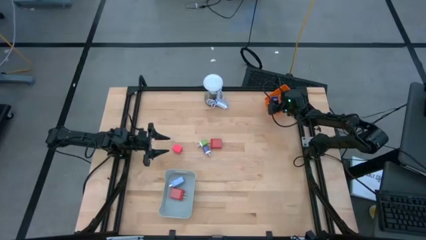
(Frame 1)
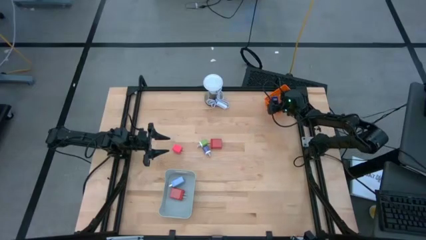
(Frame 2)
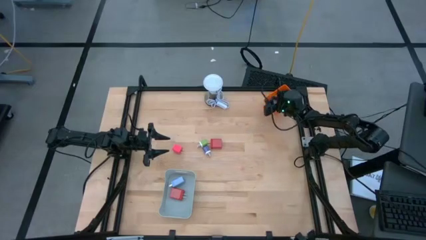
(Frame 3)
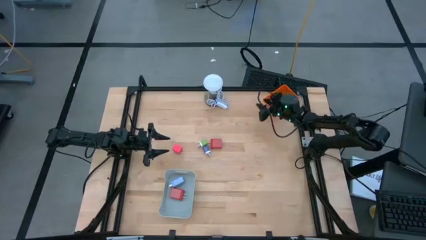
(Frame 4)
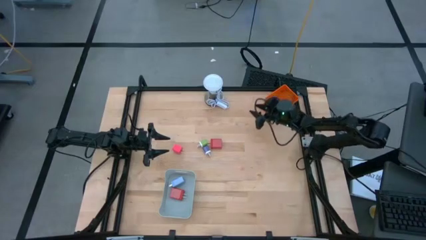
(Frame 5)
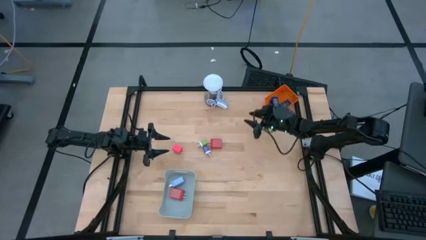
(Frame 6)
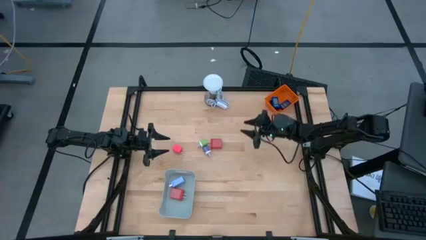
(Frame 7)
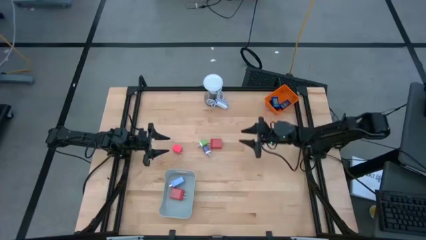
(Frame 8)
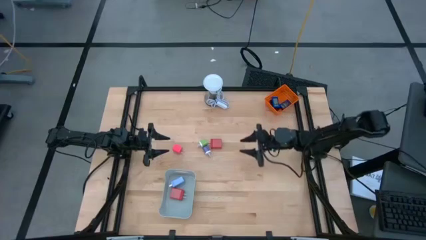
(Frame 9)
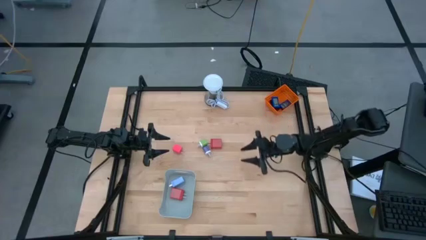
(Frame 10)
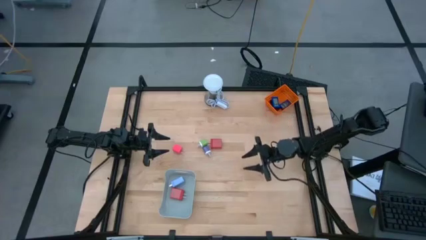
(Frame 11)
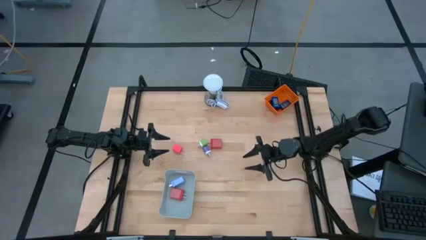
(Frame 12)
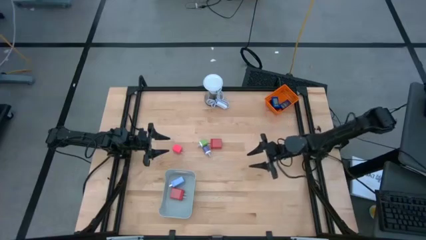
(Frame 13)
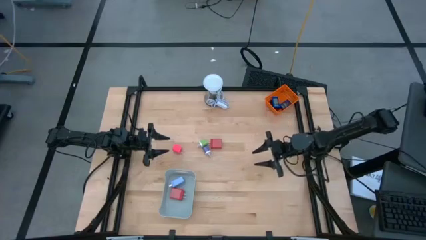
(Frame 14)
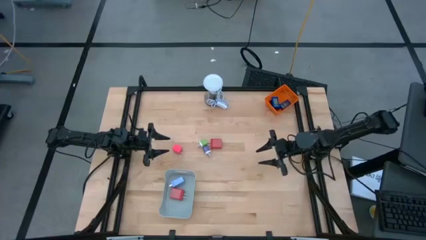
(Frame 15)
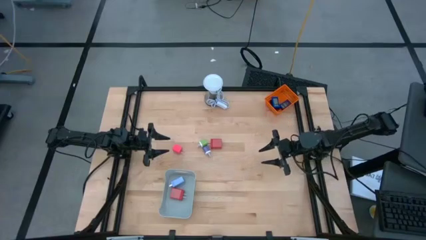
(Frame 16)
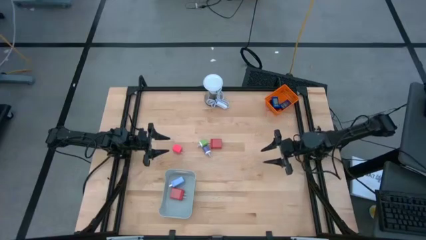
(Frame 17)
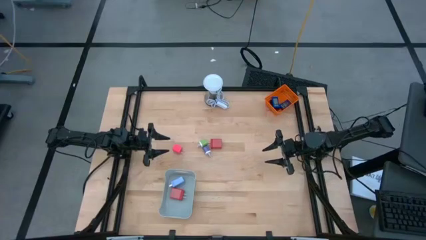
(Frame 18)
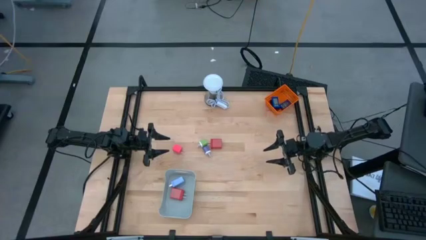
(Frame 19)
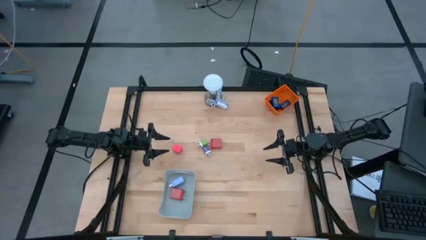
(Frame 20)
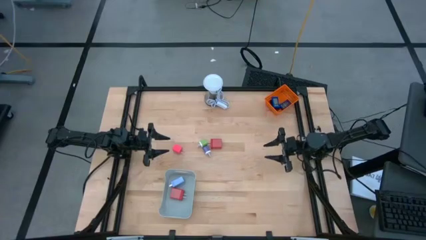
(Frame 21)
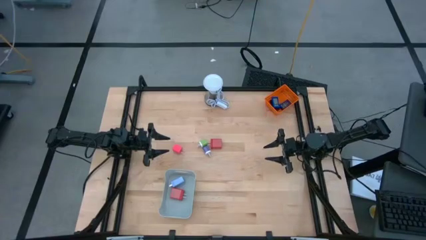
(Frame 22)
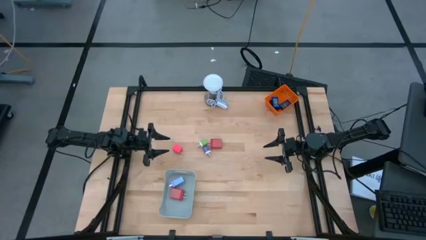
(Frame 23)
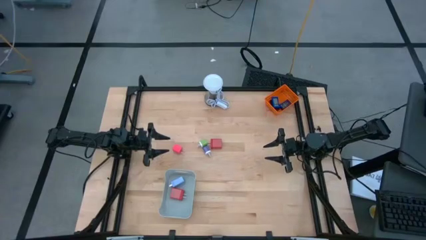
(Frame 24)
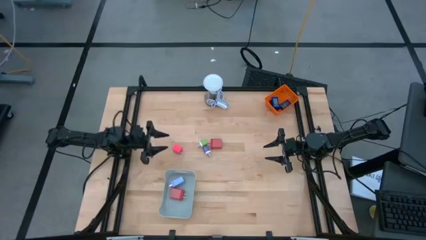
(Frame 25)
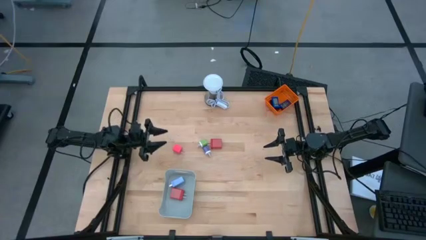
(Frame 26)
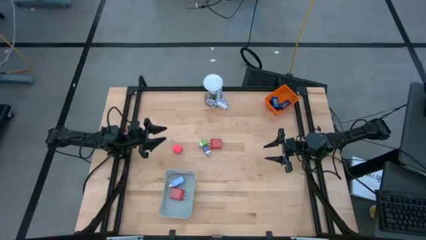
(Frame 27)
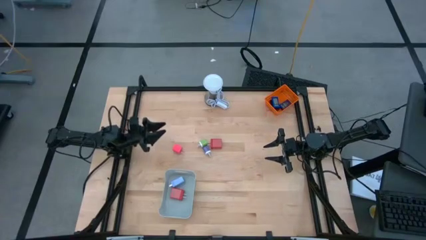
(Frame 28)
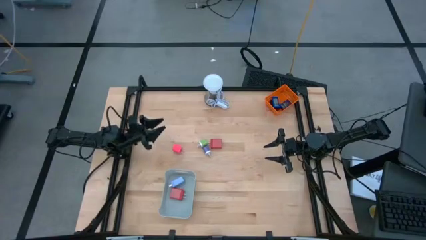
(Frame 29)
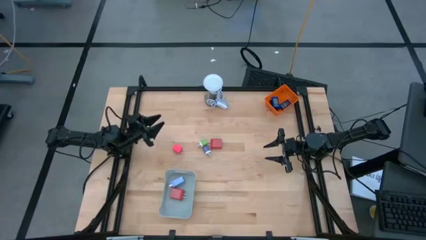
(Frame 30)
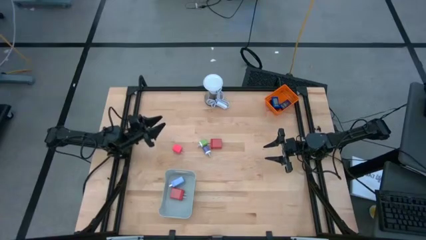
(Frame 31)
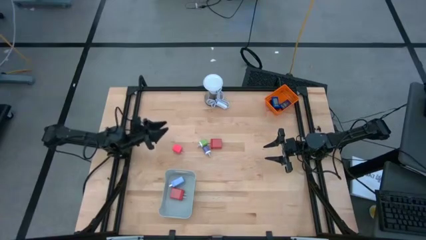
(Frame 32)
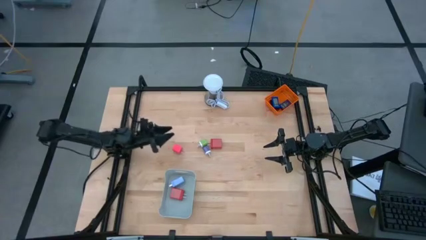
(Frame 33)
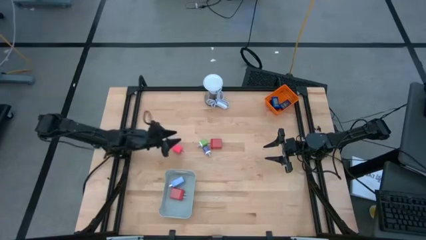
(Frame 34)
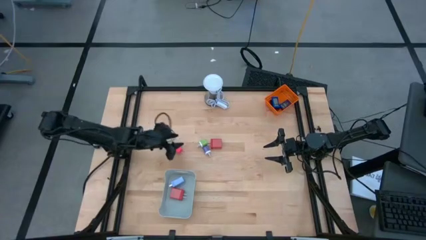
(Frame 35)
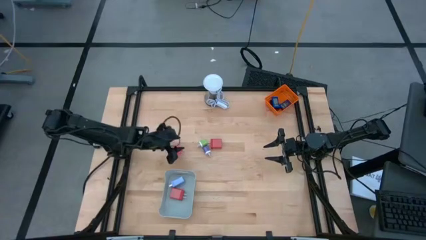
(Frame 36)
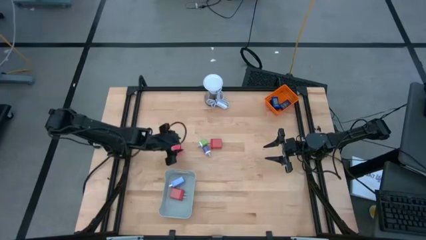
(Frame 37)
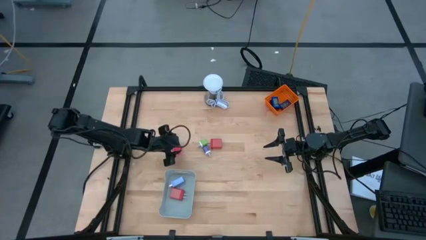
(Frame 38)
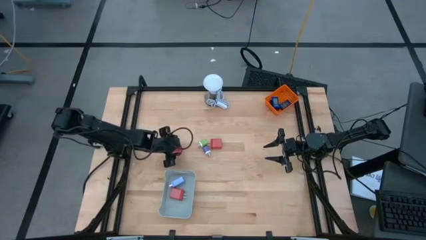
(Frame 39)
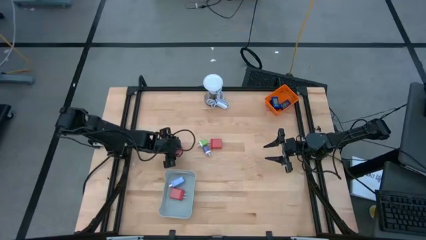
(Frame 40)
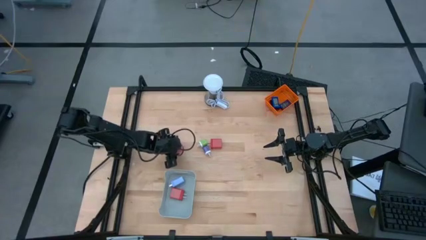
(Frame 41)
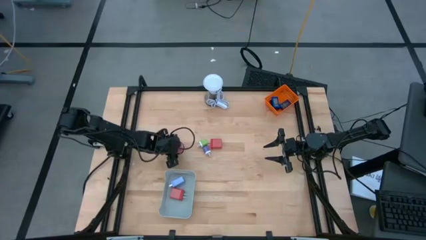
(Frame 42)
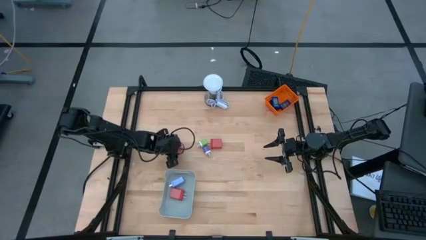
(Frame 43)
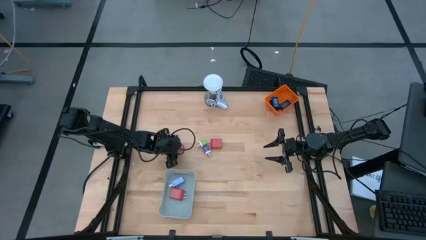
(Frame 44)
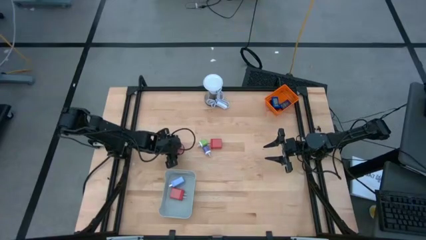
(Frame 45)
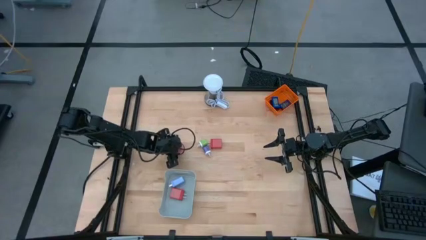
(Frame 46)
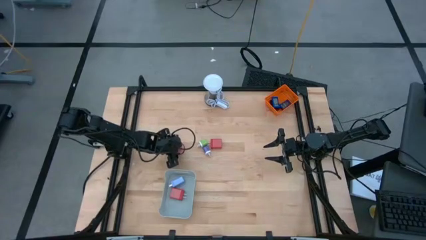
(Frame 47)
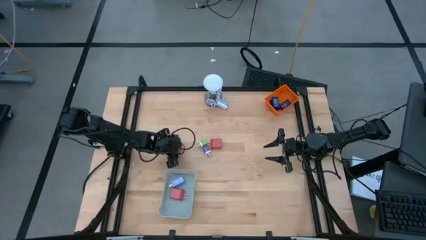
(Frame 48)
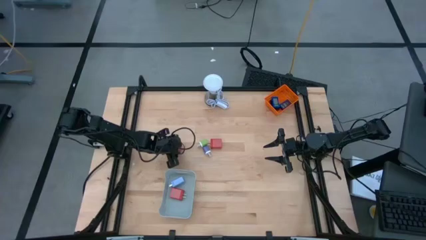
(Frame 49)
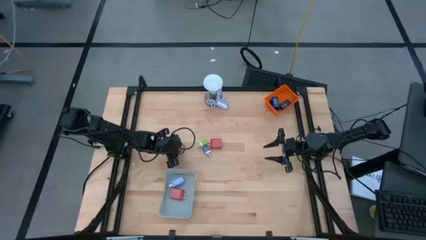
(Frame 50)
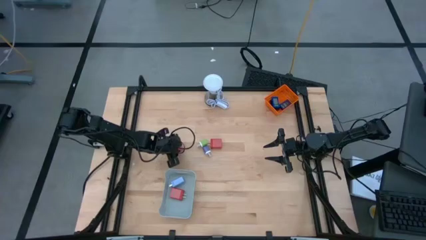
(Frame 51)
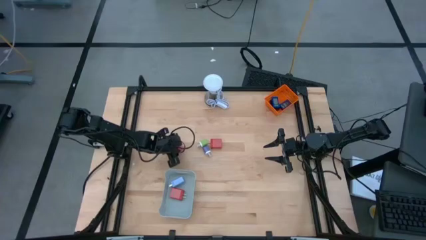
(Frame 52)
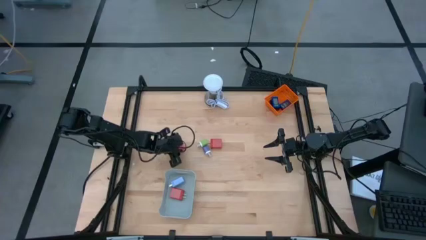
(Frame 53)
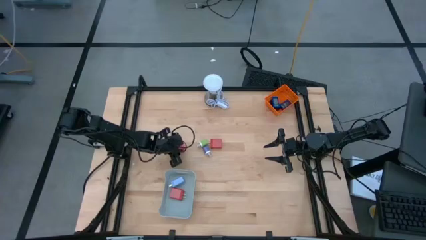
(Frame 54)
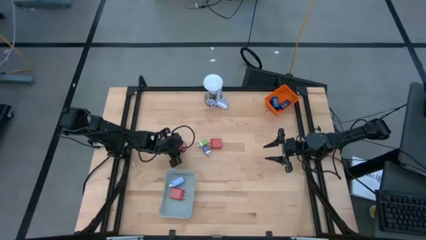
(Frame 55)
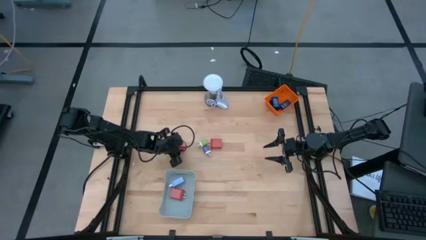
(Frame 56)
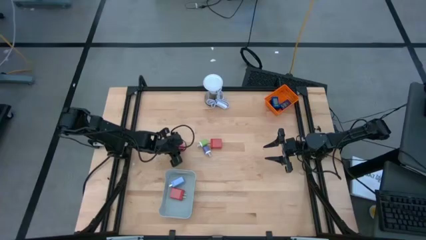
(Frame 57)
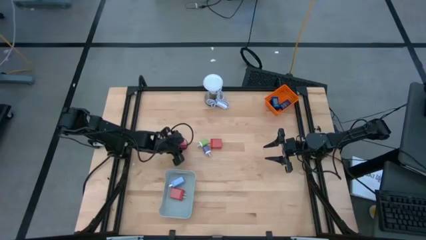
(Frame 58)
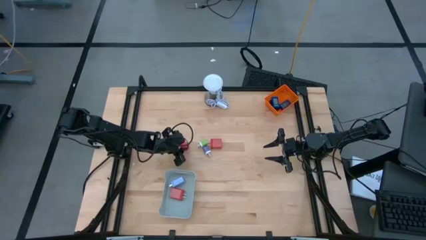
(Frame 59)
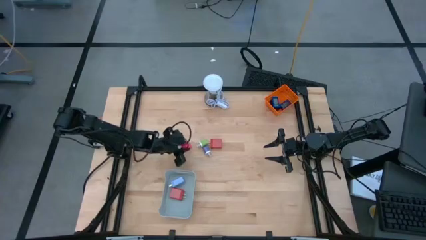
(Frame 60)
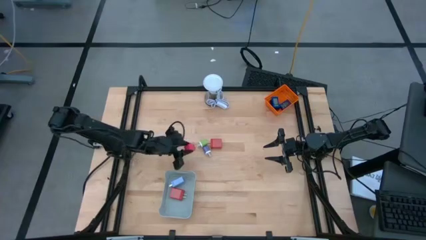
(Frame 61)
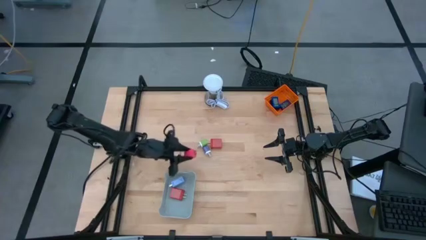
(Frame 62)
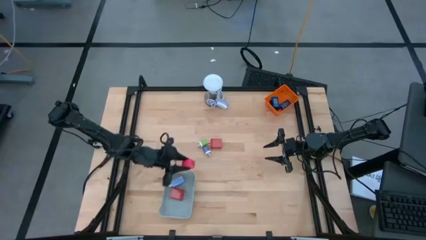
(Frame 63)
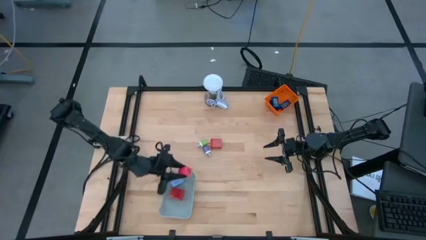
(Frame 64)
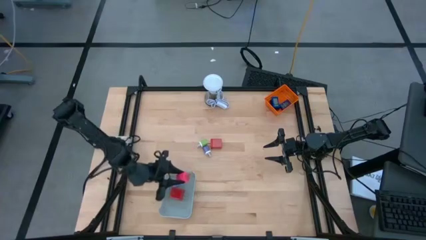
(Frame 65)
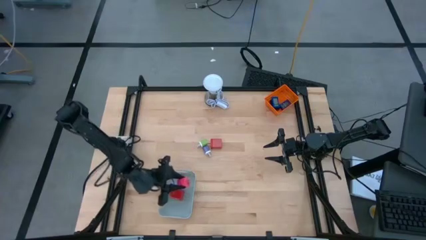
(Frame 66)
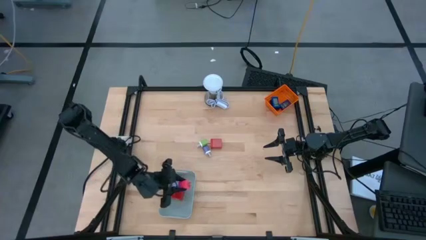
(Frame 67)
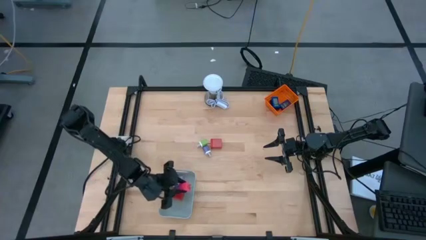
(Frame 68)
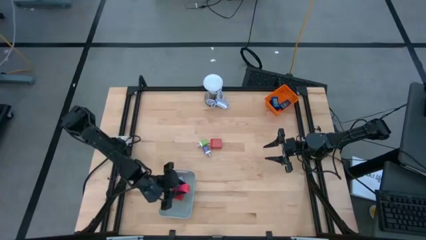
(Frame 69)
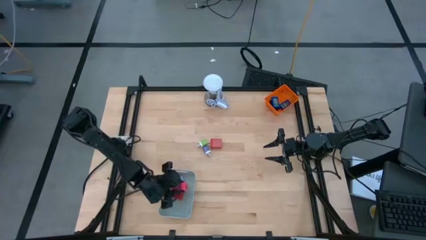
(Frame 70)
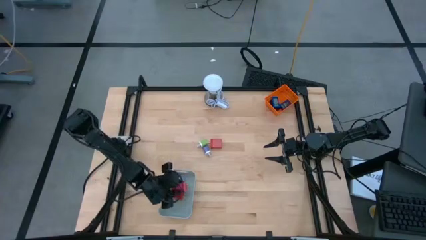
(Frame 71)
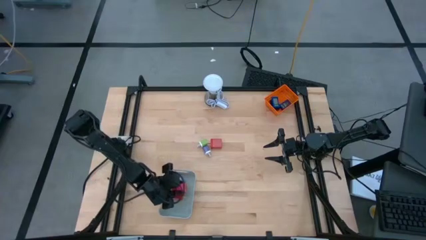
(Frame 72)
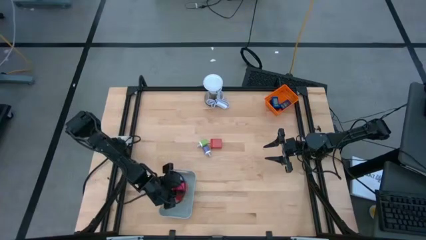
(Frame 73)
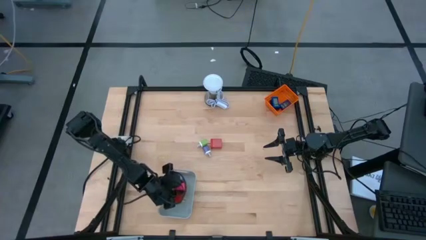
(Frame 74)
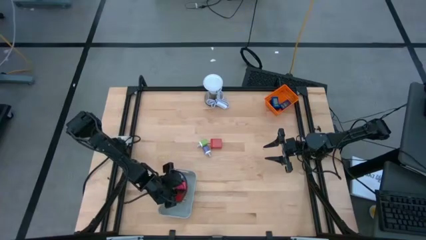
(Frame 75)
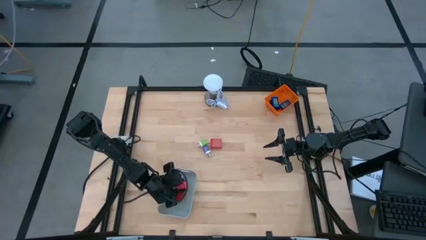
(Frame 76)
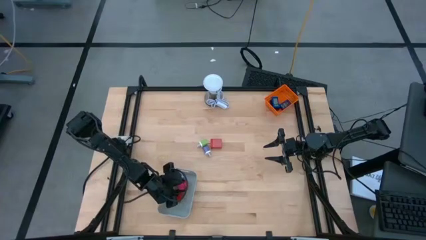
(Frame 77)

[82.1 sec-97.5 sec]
Task: Pick & Place Office items
Put the pink charger adapter into the gray bin
